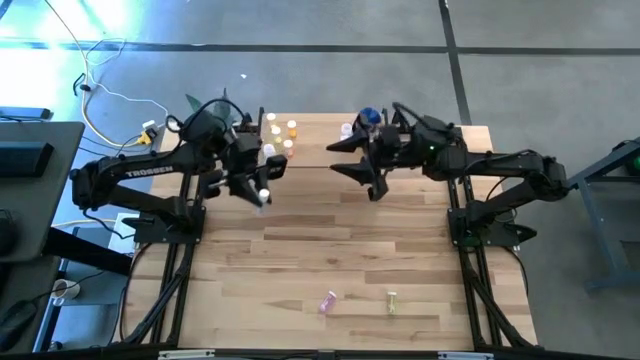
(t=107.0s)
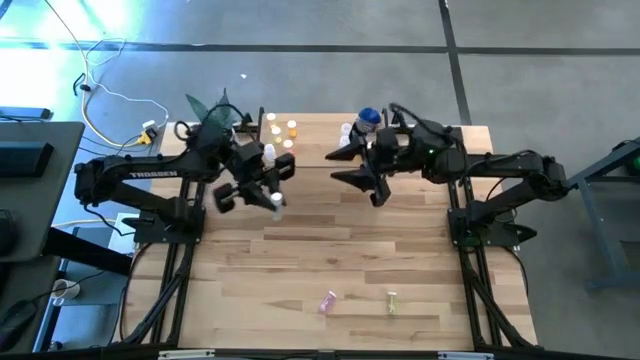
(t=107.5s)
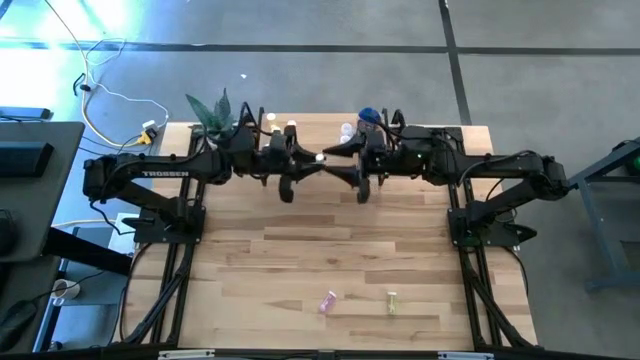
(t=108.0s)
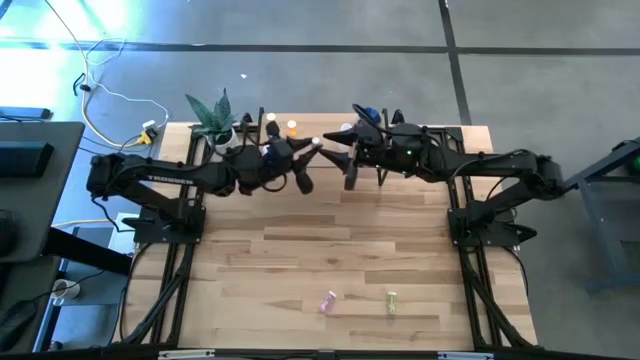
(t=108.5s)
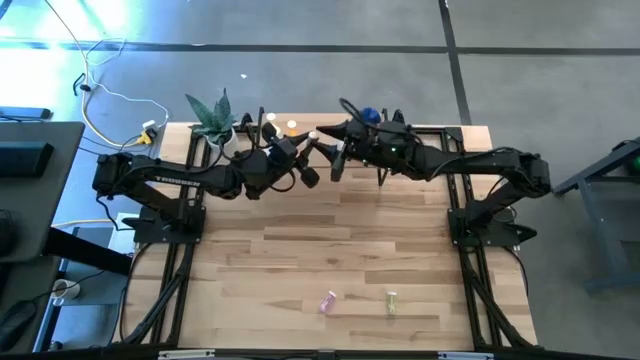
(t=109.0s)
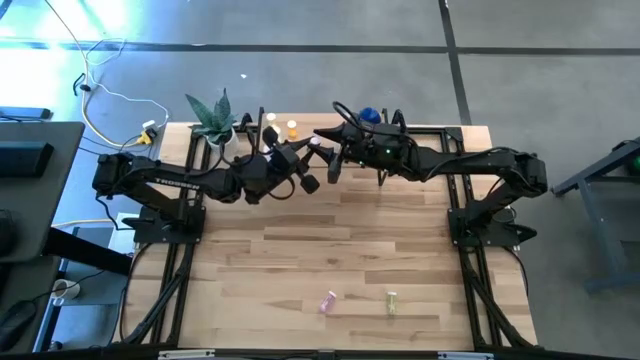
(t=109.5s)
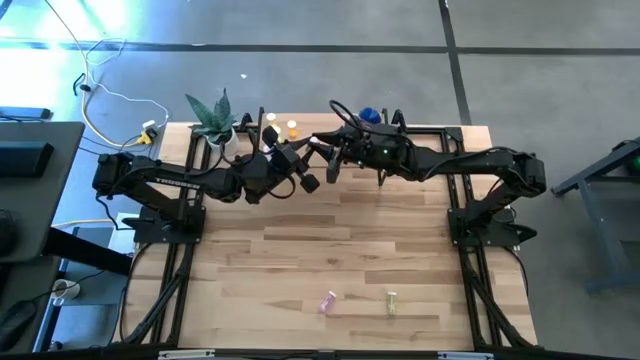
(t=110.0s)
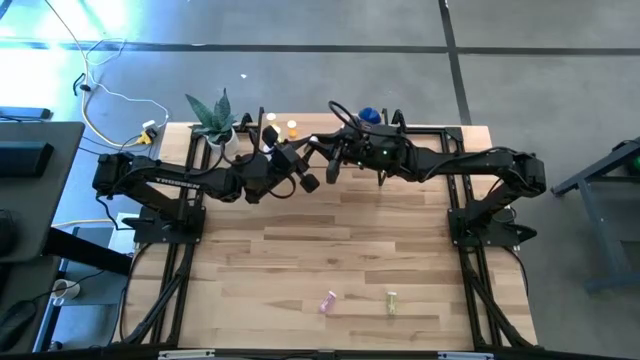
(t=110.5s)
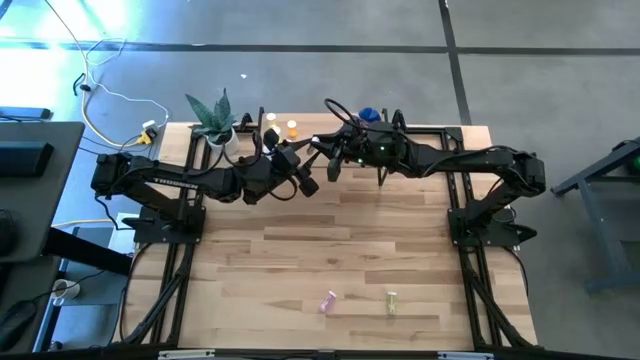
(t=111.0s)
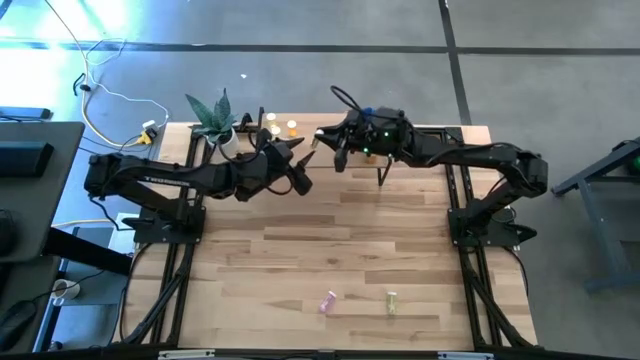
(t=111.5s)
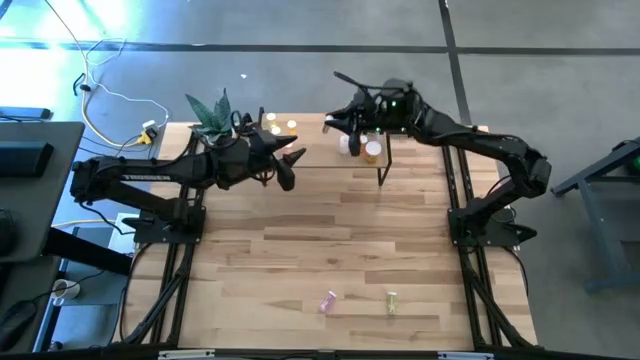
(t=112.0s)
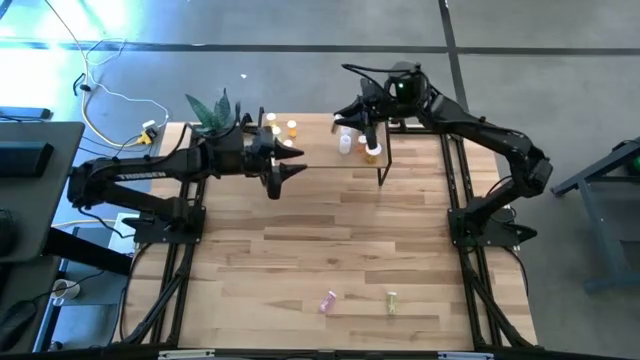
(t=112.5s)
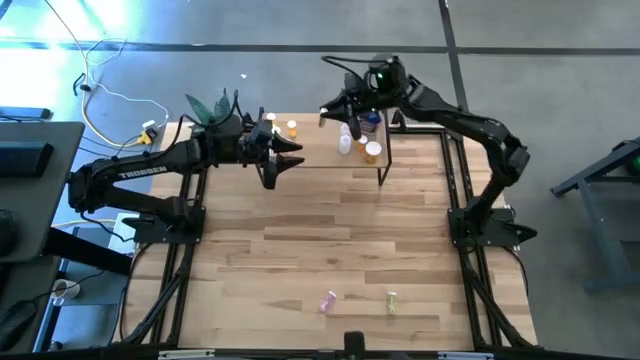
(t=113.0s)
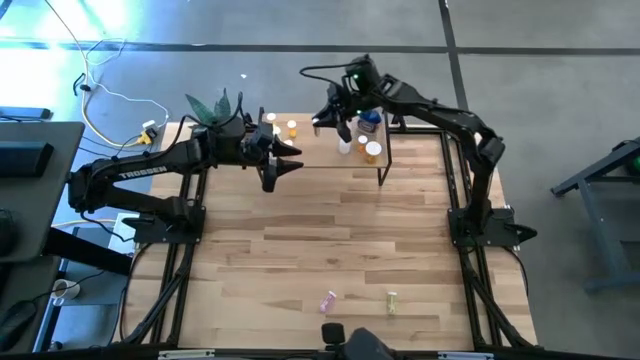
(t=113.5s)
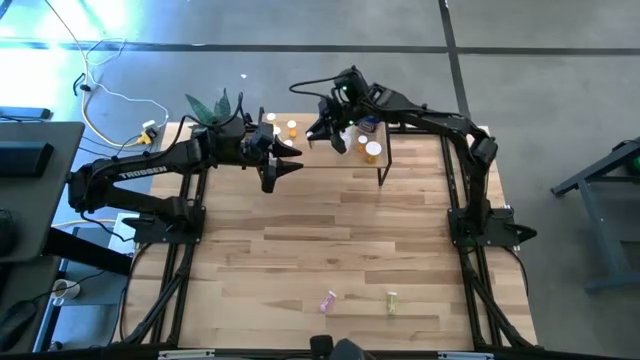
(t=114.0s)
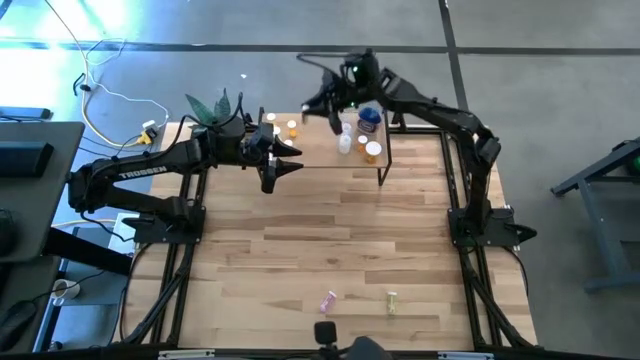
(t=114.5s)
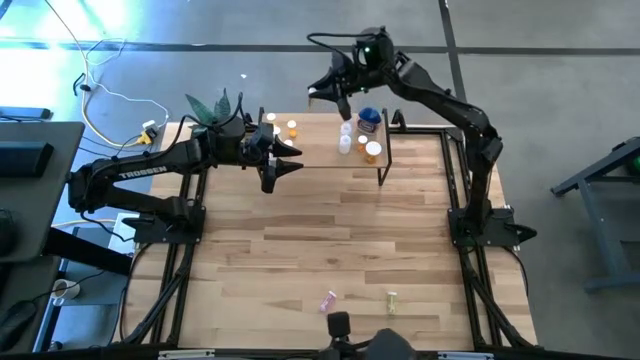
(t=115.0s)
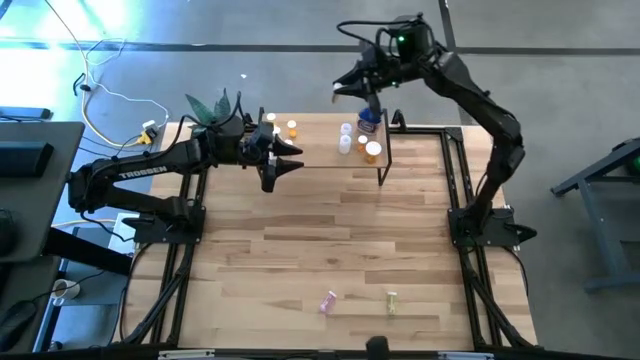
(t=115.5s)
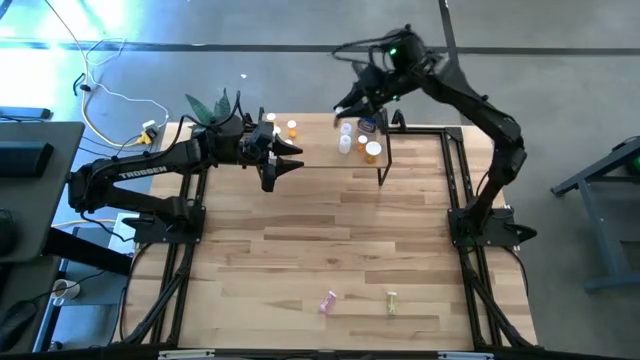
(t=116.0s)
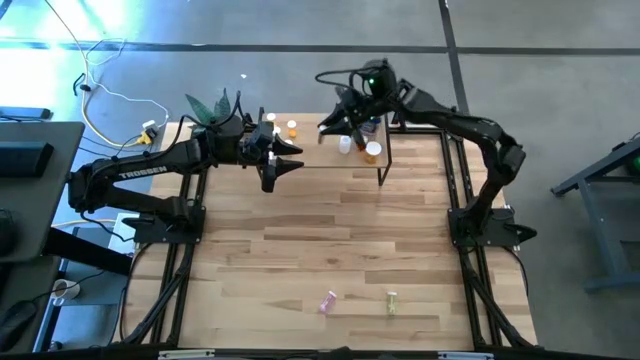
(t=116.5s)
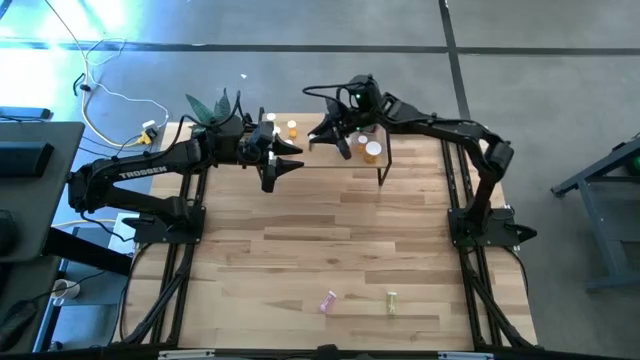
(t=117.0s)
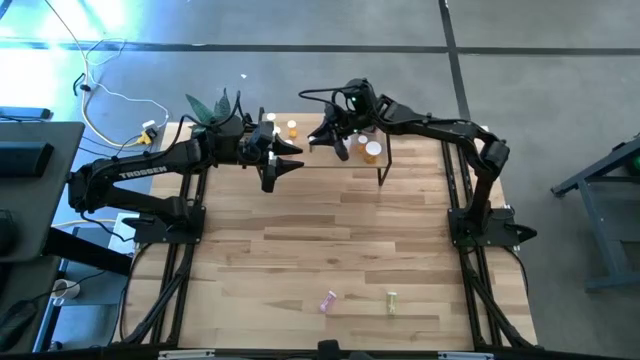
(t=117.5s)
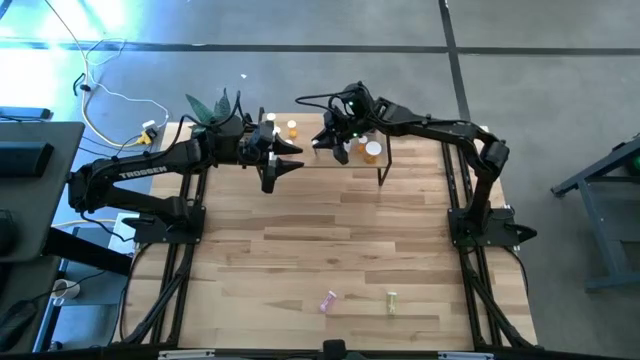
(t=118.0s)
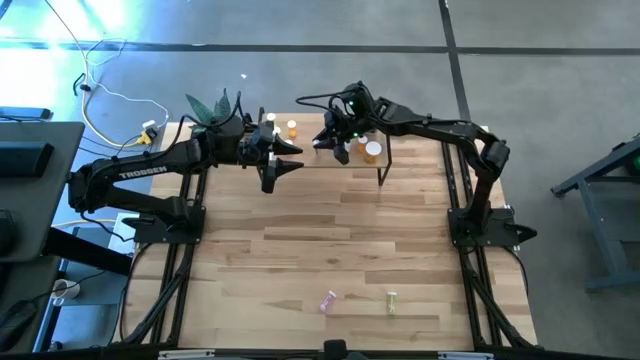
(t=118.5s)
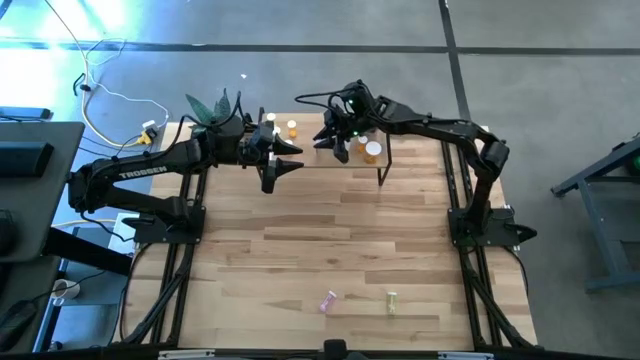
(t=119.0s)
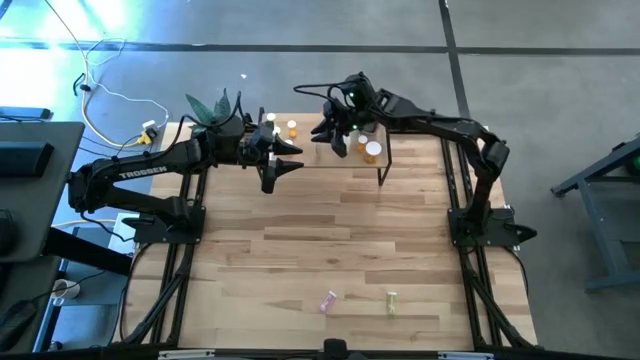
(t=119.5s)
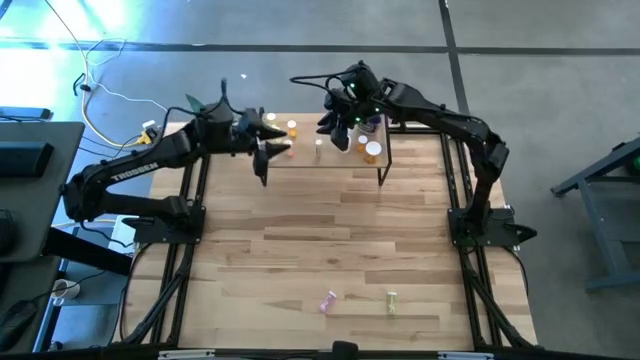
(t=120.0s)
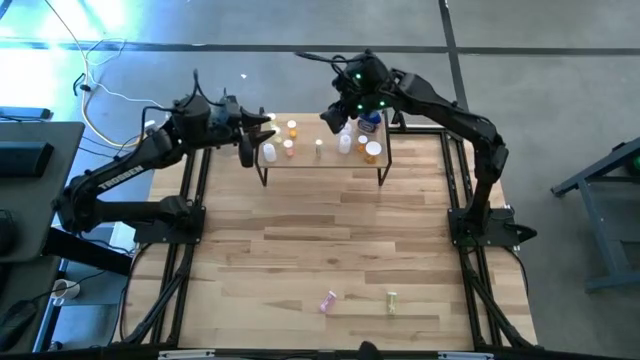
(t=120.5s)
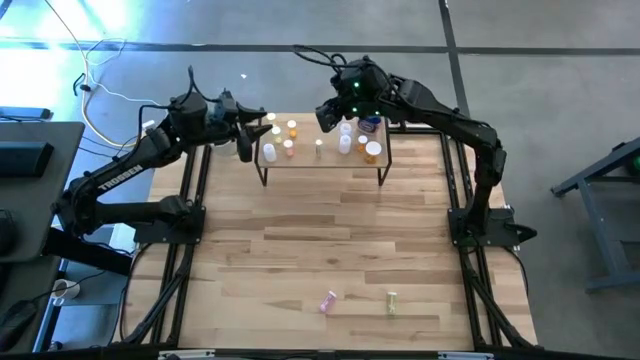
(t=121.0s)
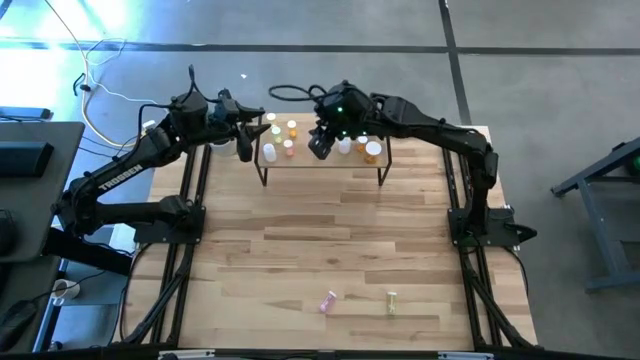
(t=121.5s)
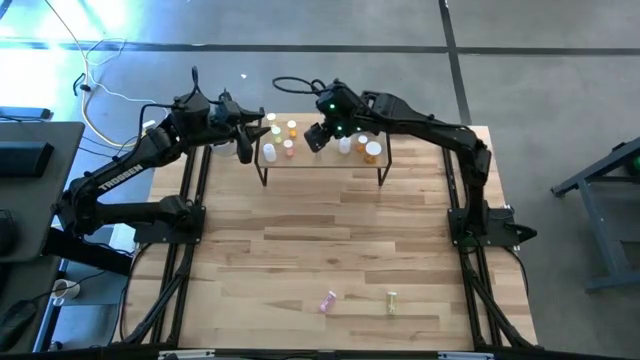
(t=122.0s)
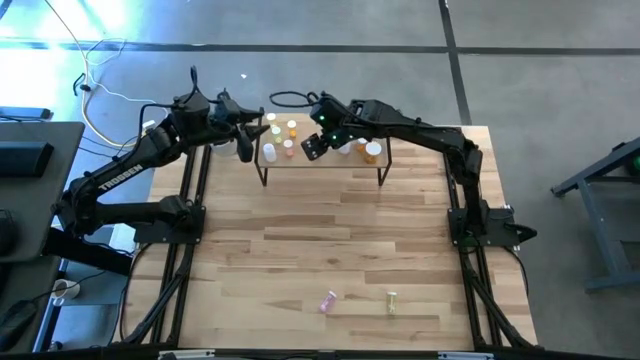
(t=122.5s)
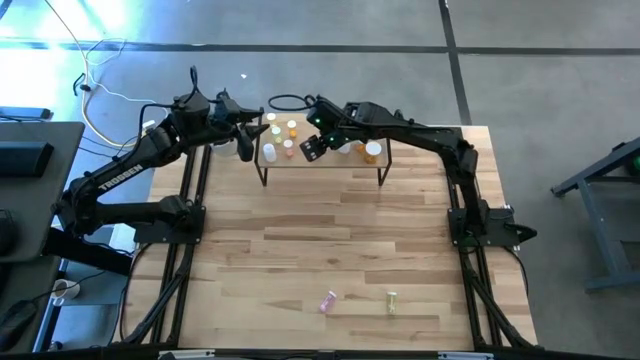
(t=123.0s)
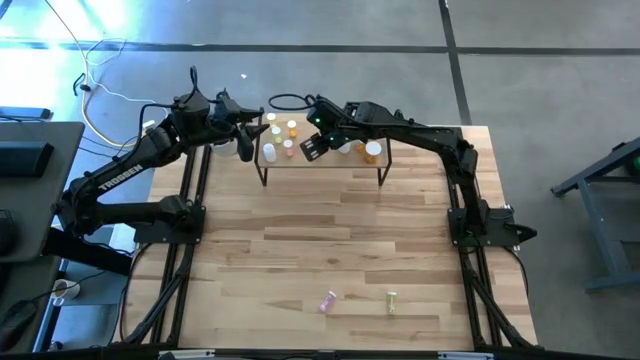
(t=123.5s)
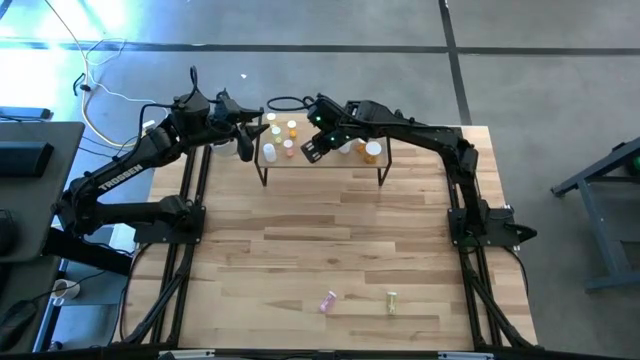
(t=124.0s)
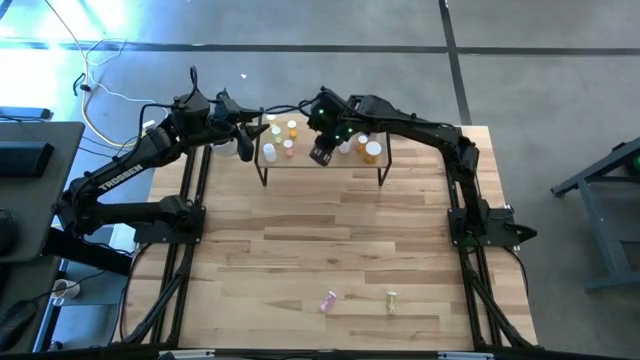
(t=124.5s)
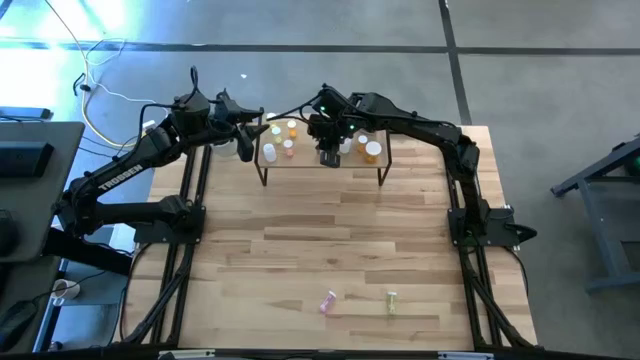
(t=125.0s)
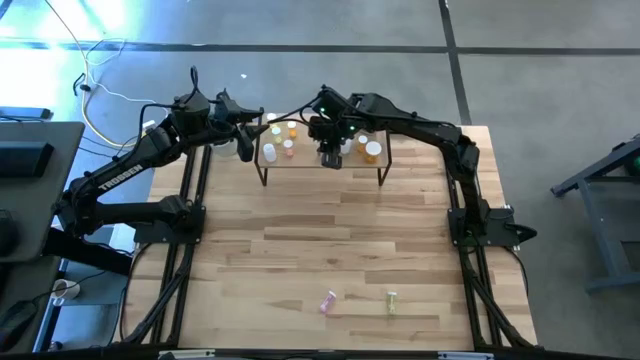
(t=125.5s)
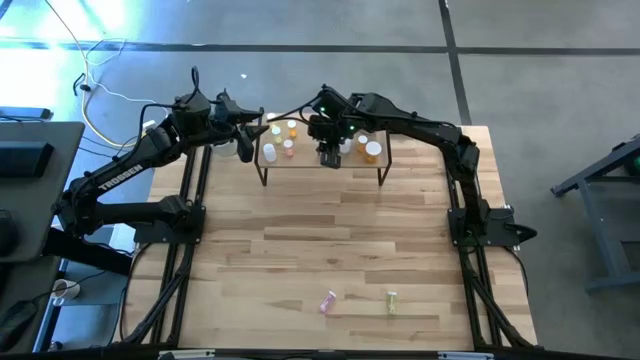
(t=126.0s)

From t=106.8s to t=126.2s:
Task: Pick and place medicine bottles onto shelf by color
Put the small white pill bottle on the shelf

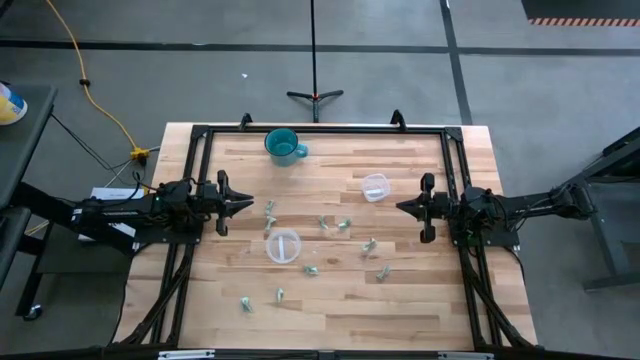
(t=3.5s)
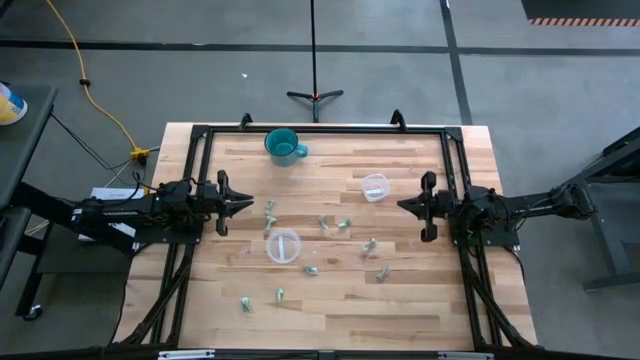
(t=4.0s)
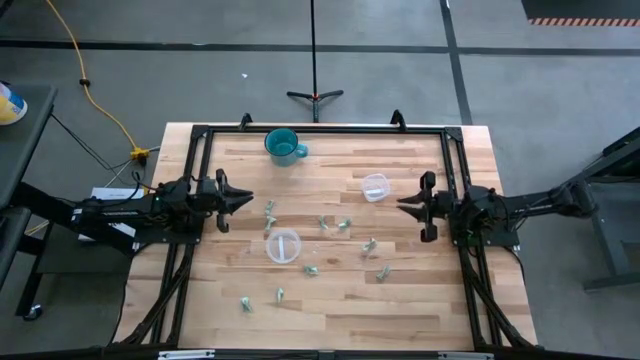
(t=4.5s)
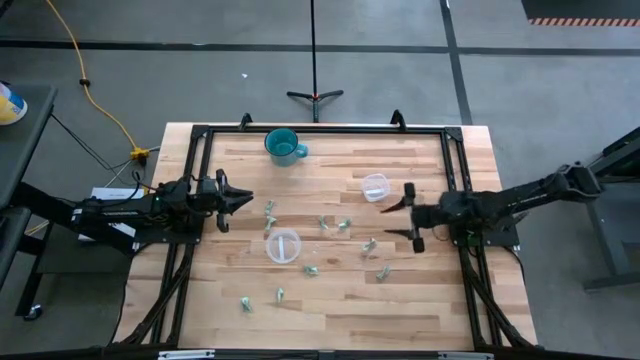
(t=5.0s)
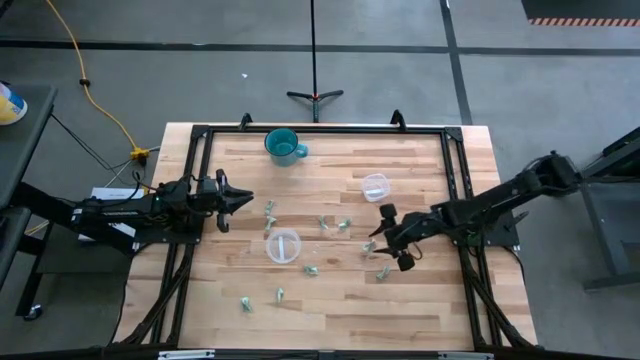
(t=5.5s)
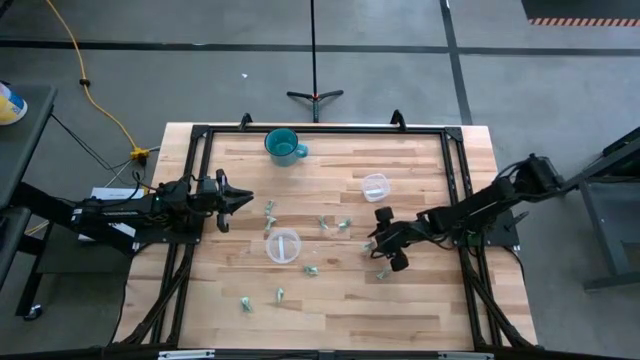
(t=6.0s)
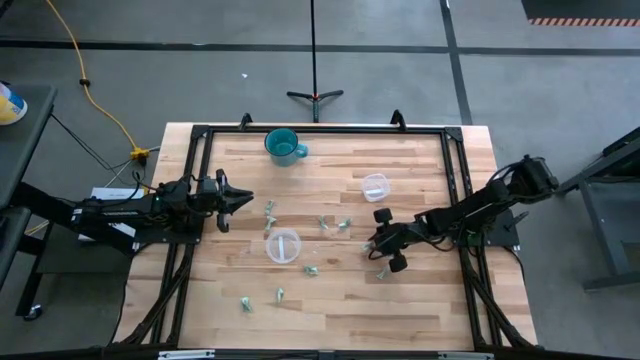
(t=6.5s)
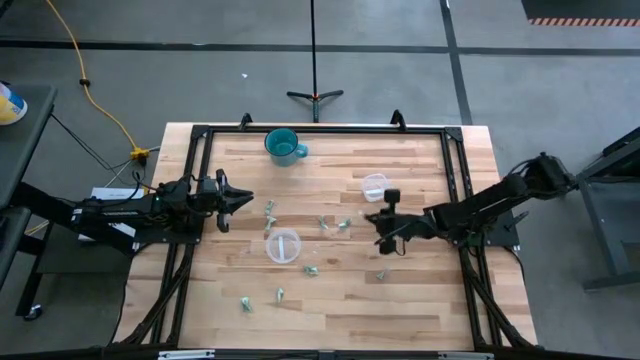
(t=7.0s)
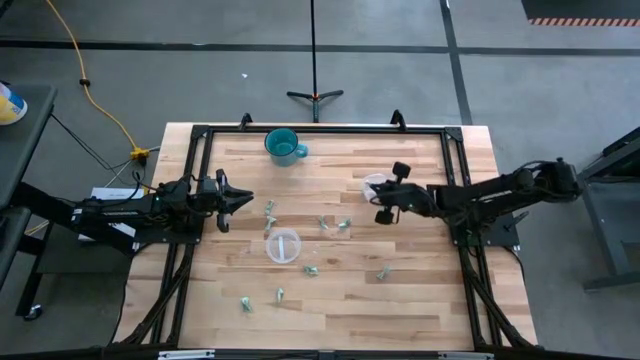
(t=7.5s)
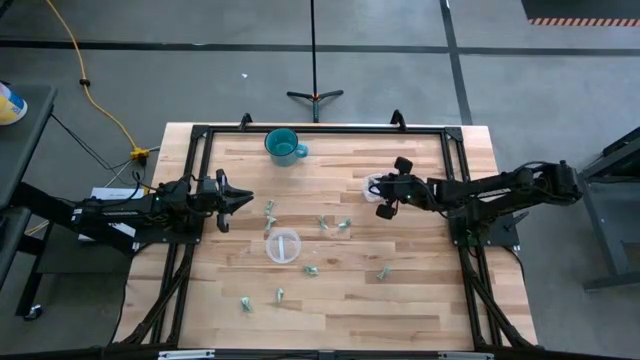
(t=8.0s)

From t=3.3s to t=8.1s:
Task: Pick and place items into bin
Put the stevia packet into the right transparent bin
